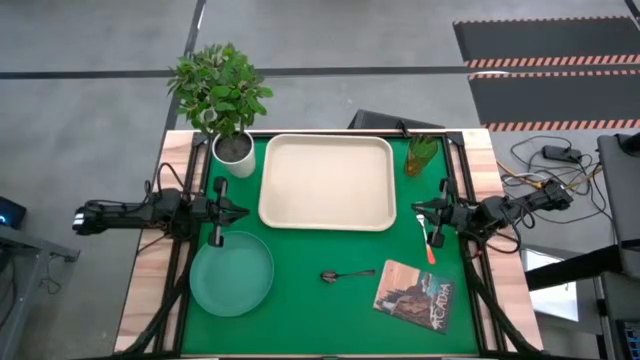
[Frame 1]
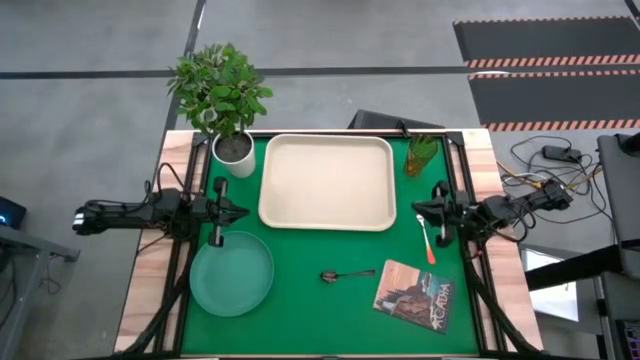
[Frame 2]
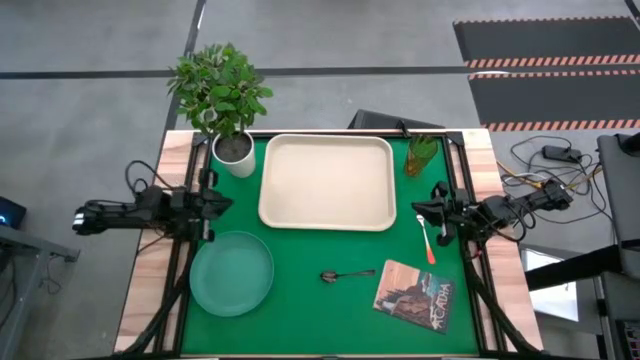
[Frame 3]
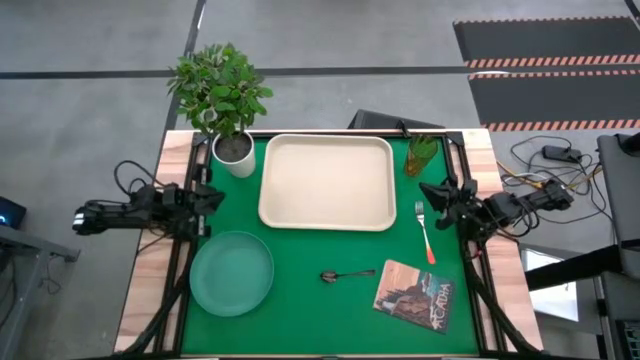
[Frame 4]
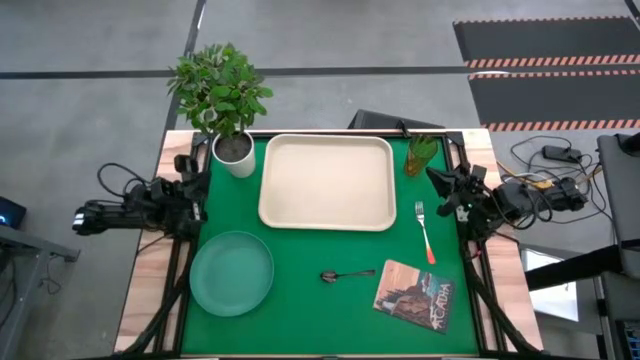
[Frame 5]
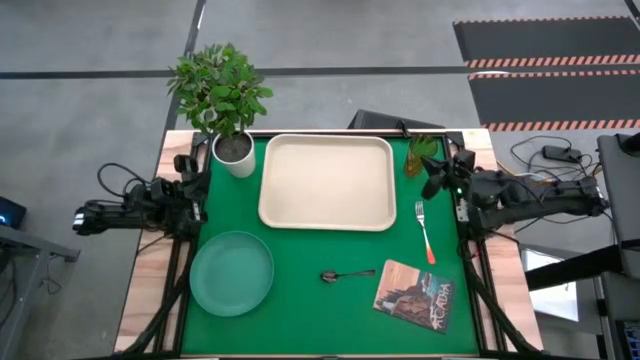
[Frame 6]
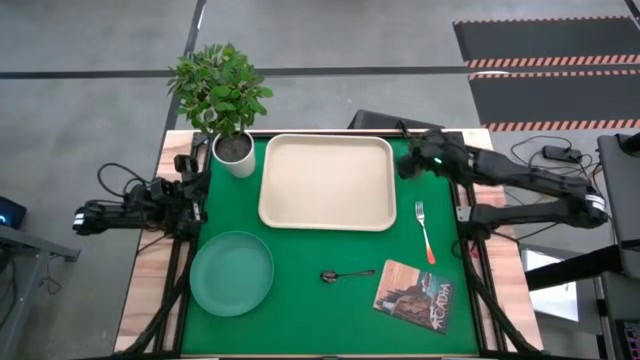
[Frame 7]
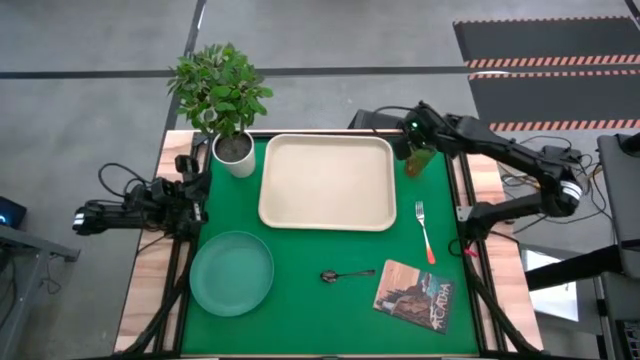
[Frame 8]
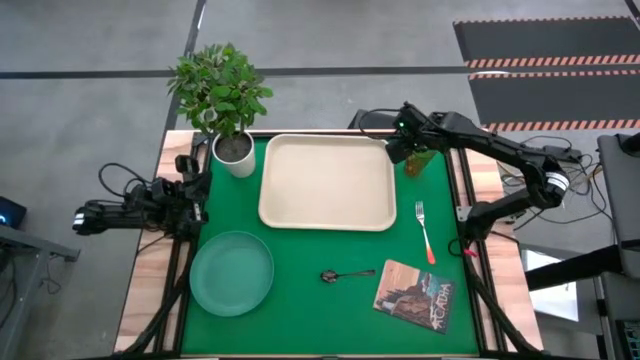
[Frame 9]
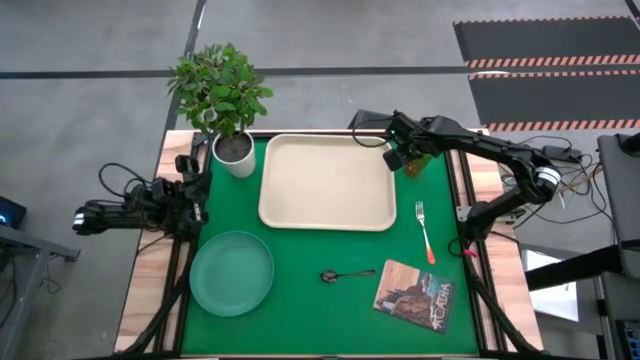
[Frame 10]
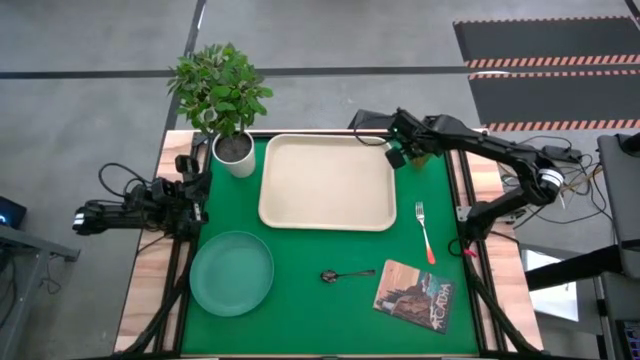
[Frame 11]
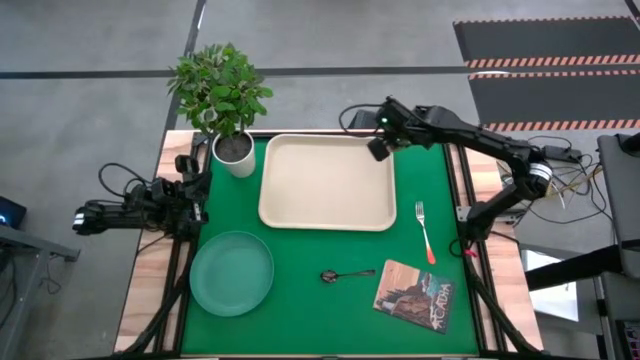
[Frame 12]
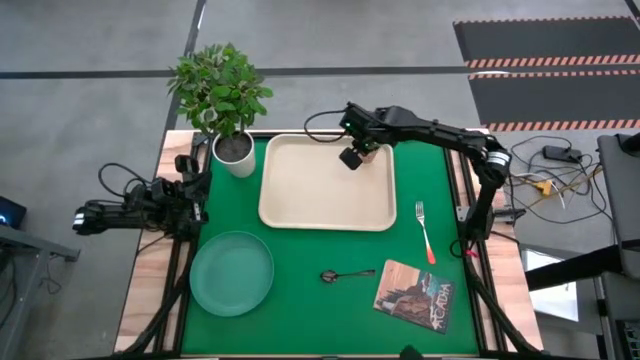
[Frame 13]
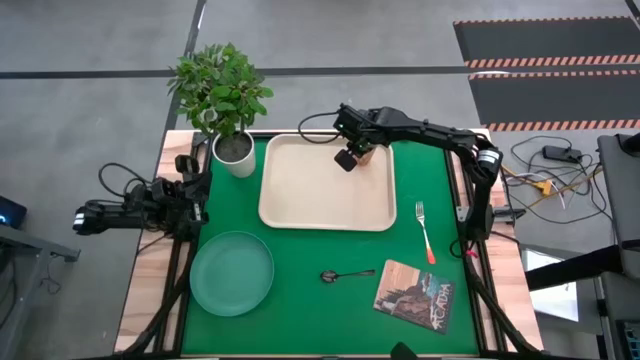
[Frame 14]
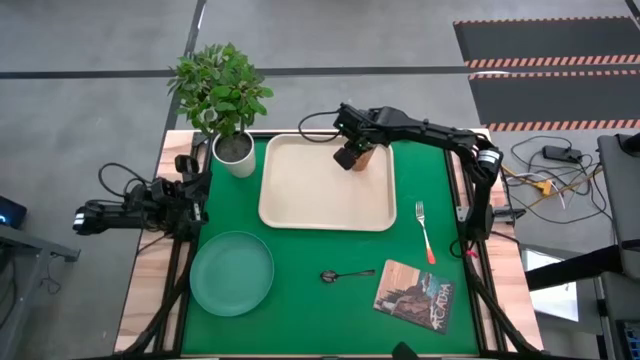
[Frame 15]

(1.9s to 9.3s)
Task: Pick and place plate/cup/fork/spoon on tray
Put the brown glass on the white tray

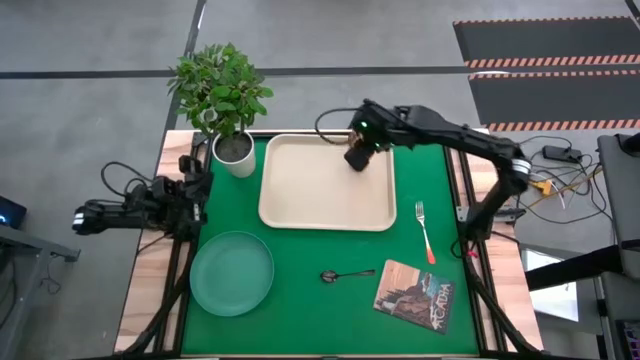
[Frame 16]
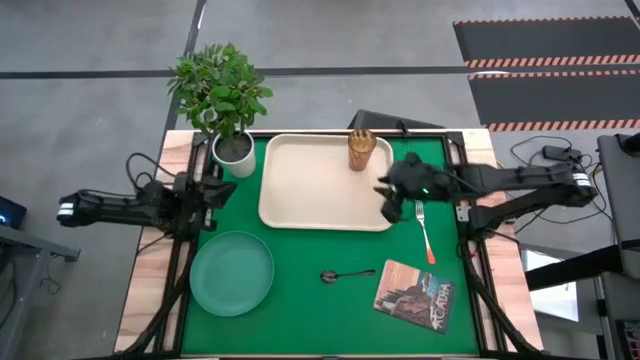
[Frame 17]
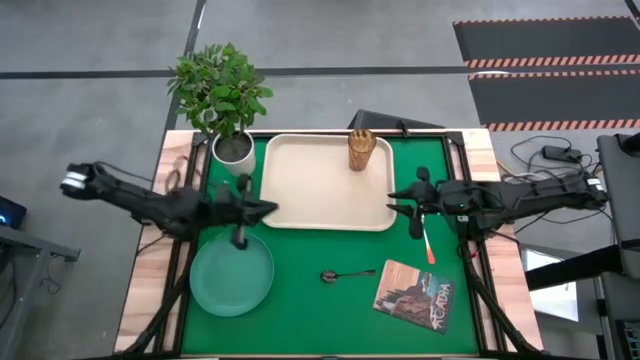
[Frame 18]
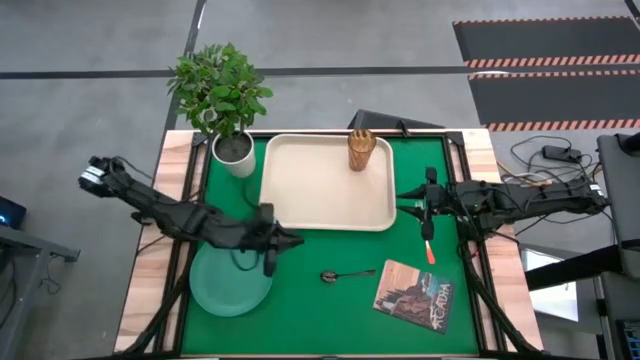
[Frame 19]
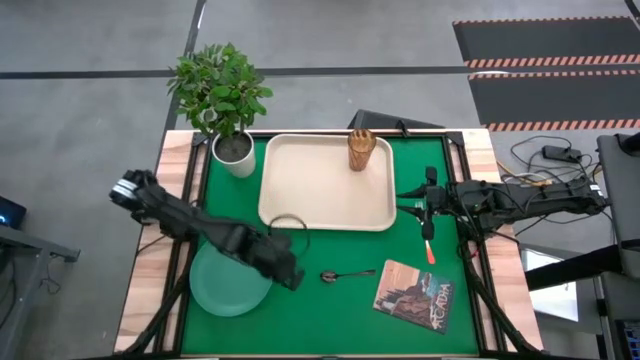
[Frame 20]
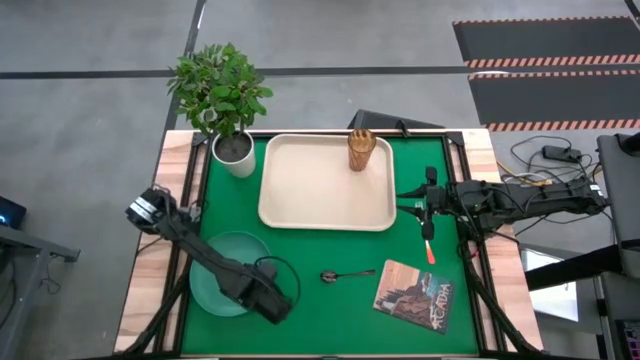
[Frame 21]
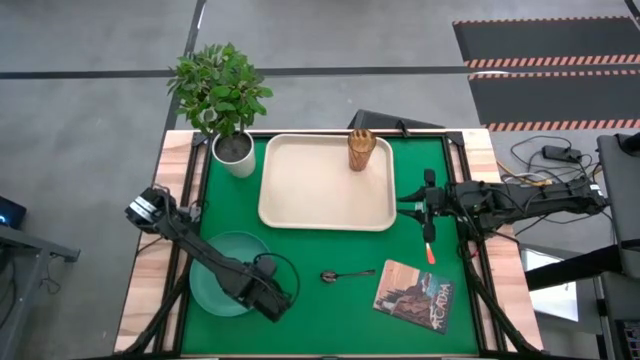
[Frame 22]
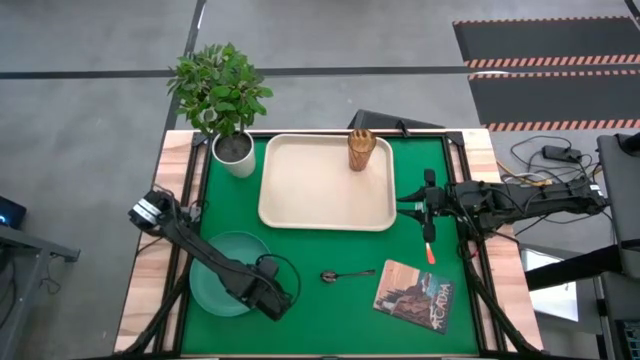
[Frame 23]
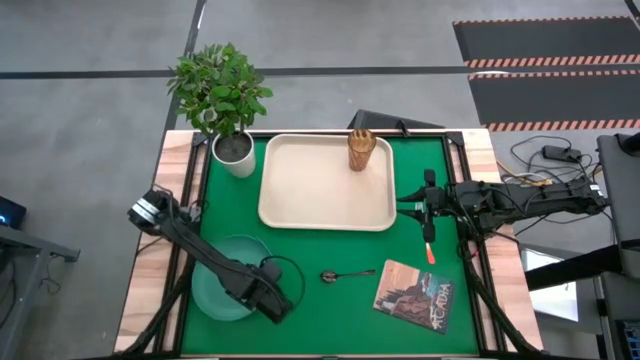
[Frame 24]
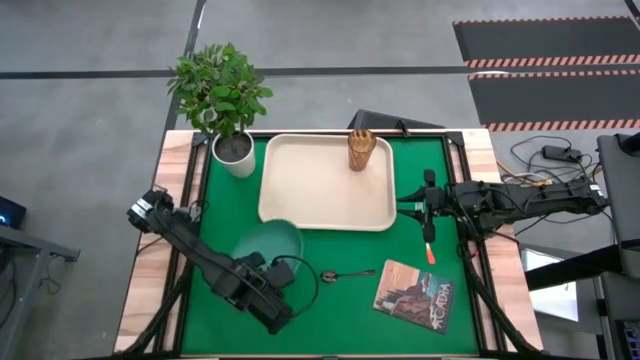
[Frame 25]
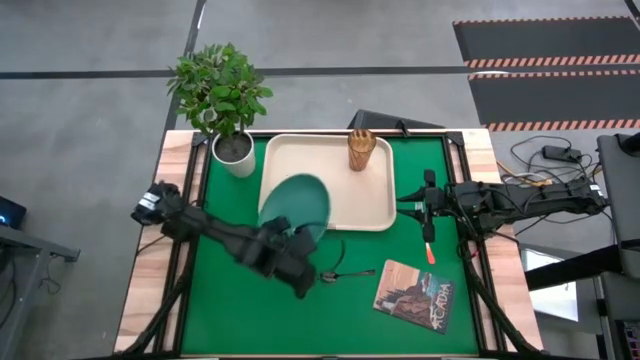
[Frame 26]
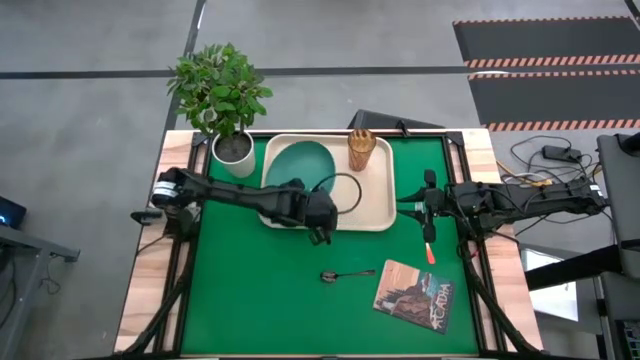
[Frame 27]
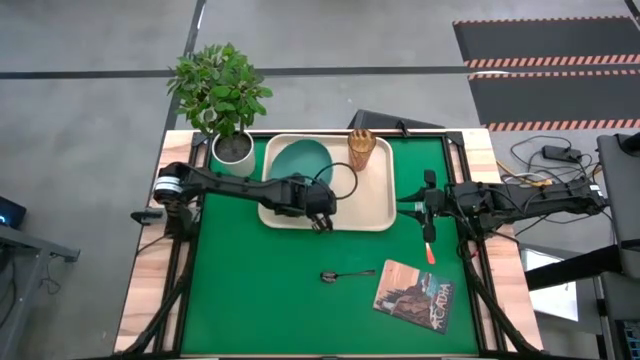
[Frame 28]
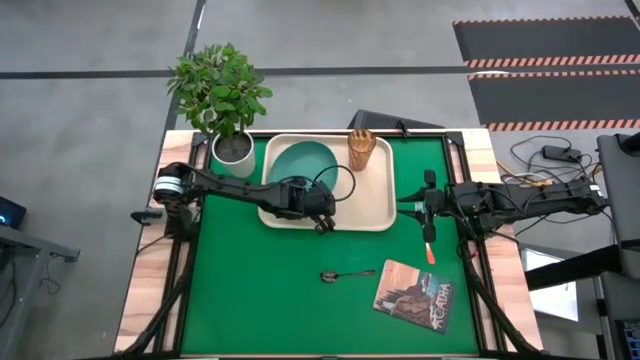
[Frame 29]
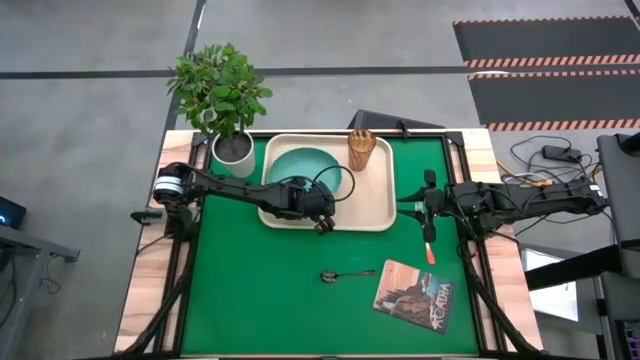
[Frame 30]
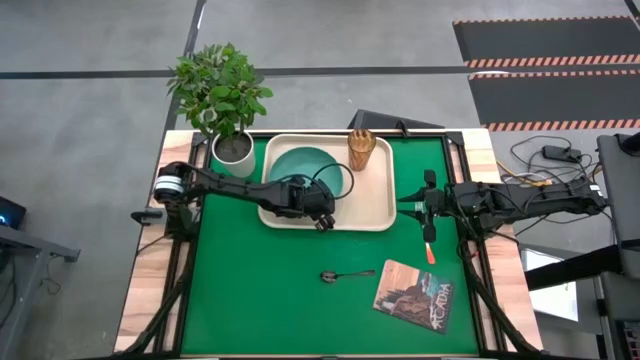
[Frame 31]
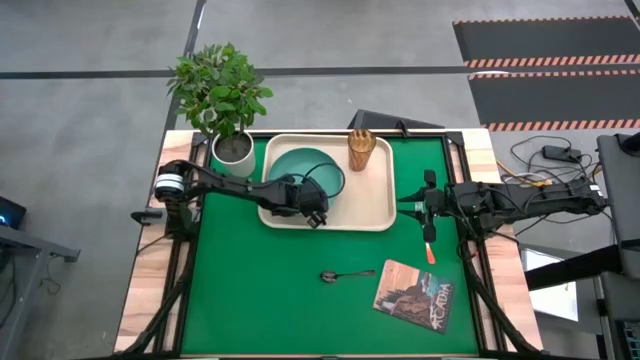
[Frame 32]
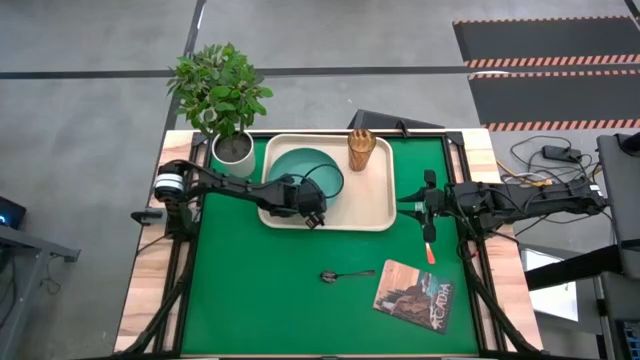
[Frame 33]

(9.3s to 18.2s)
Put the green plate beside the brown glass on the white tray

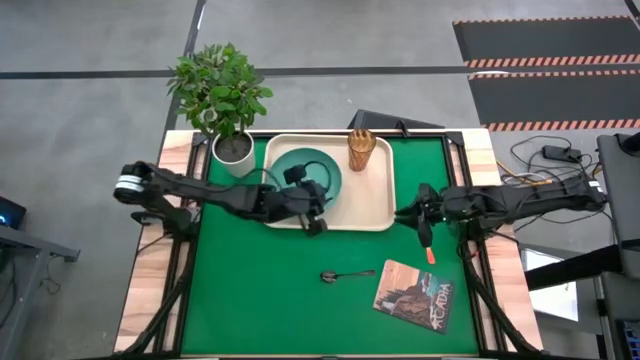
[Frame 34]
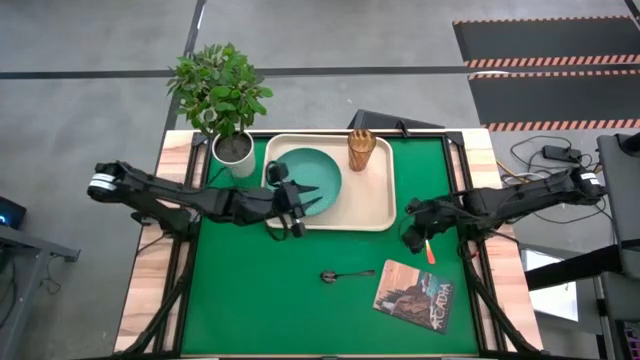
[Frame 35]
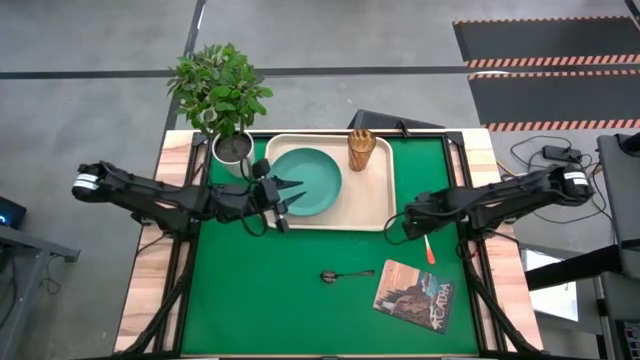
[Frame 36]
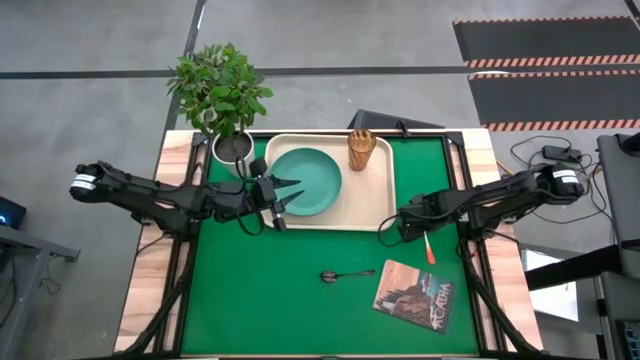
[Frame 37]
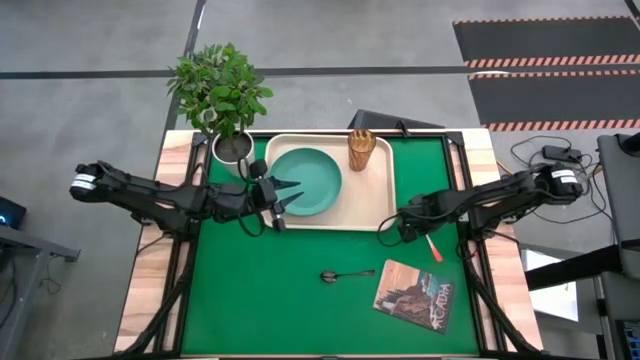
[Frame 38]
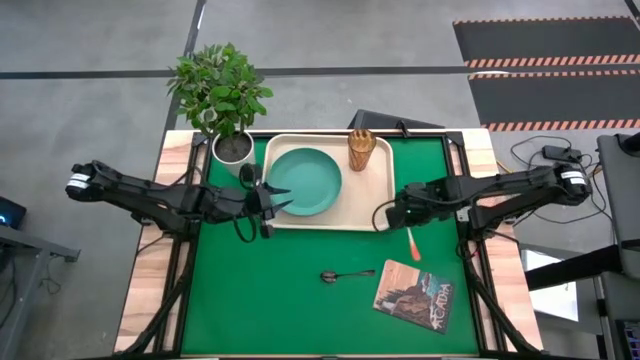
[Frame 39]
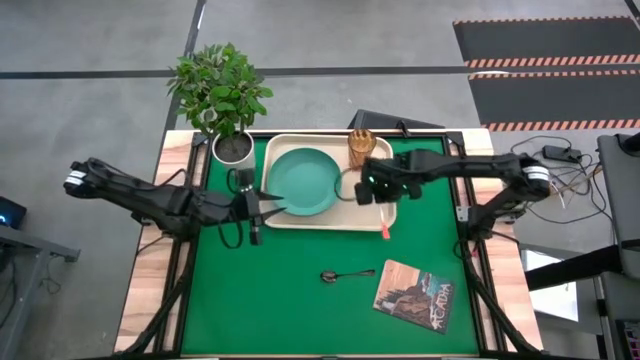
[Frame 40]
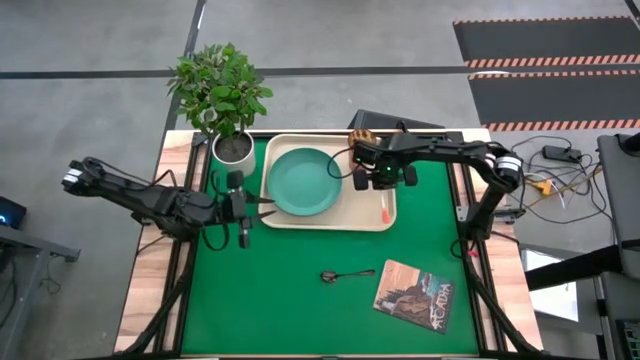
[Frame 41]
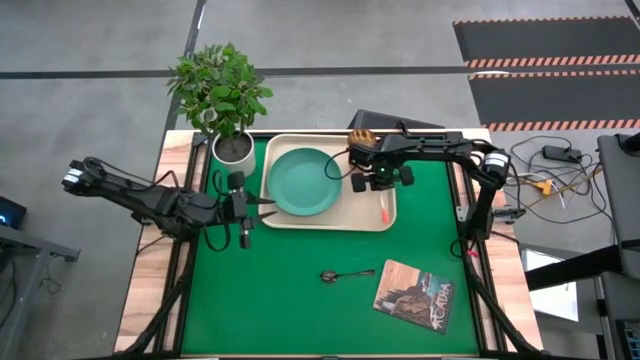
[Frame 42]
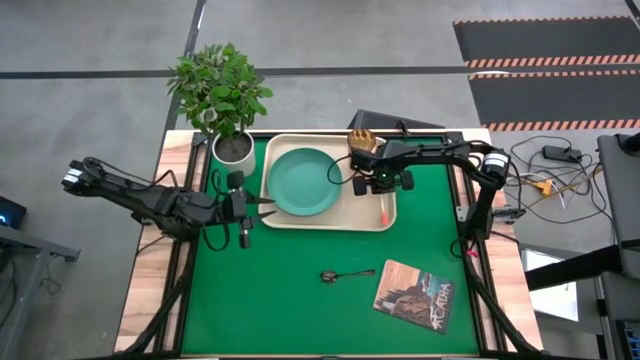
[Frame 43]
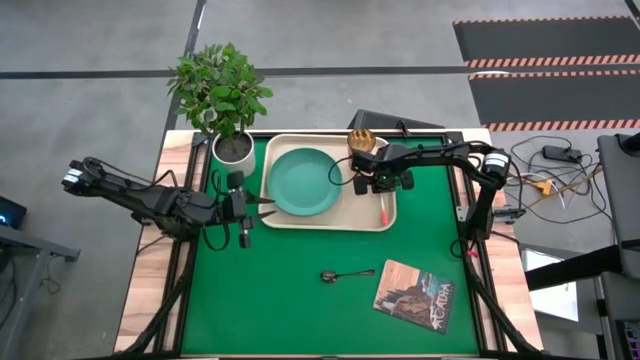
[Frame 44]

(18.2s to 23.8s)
Put the orange fork below the brown glass on the white tray
